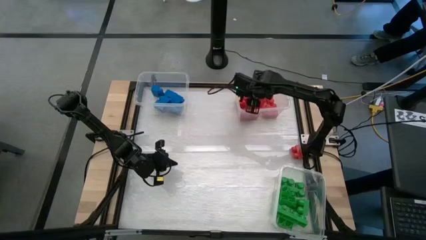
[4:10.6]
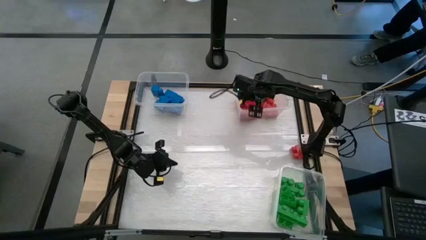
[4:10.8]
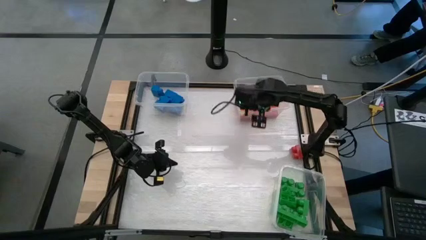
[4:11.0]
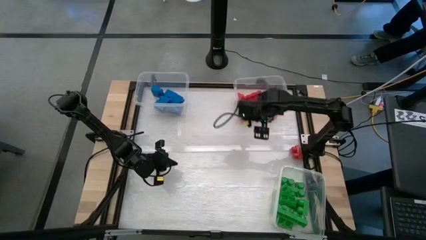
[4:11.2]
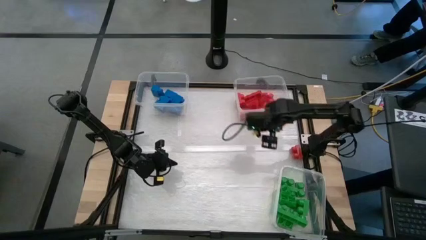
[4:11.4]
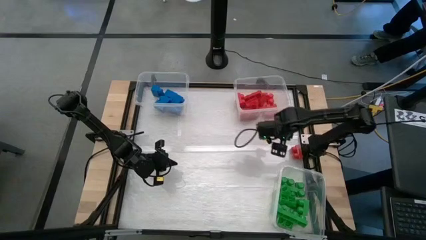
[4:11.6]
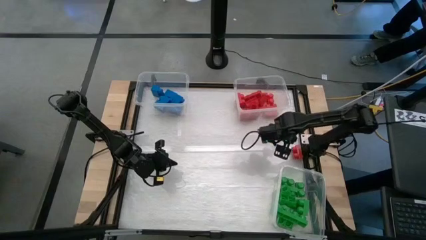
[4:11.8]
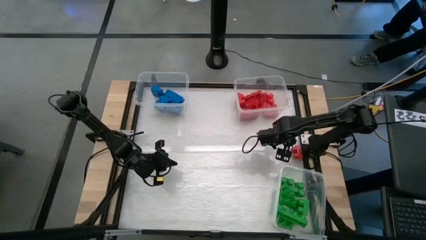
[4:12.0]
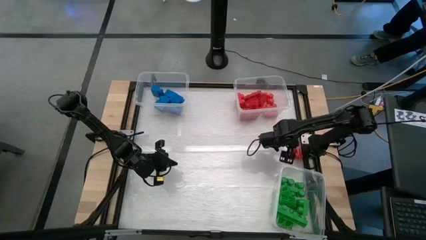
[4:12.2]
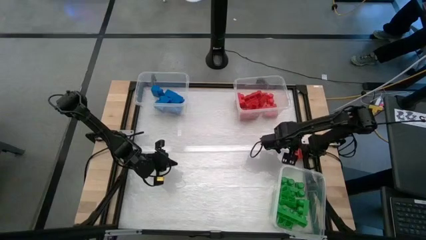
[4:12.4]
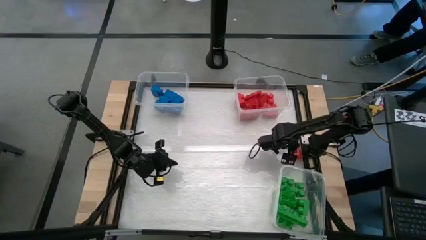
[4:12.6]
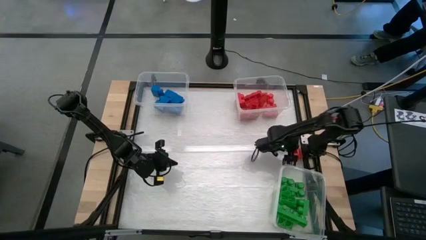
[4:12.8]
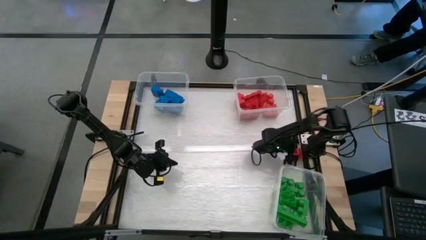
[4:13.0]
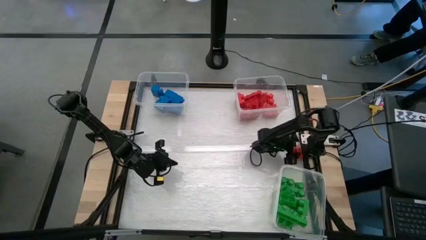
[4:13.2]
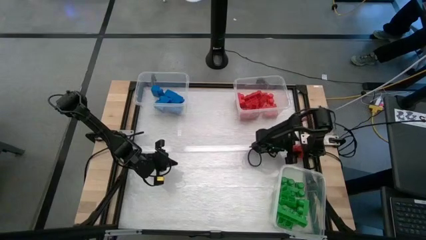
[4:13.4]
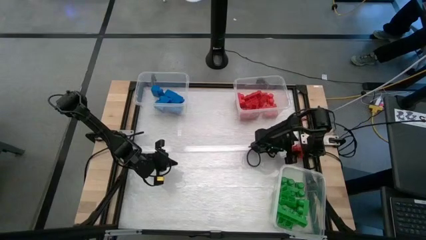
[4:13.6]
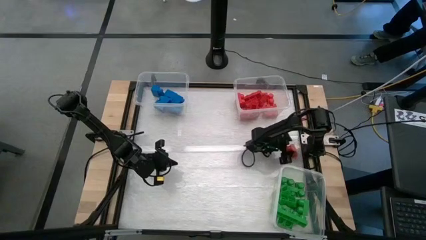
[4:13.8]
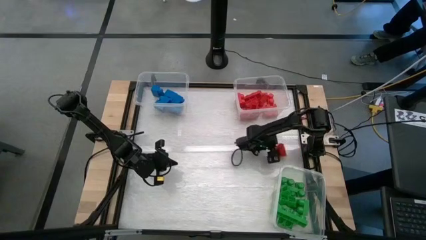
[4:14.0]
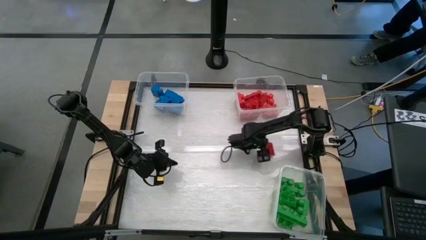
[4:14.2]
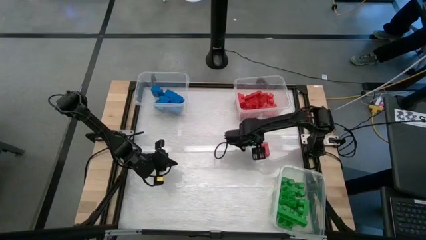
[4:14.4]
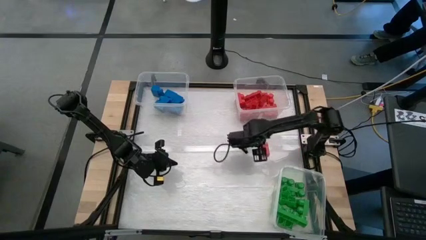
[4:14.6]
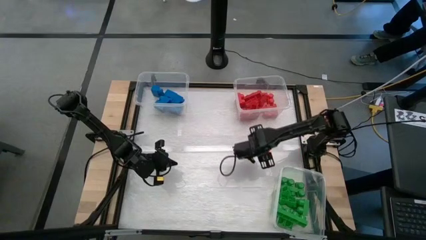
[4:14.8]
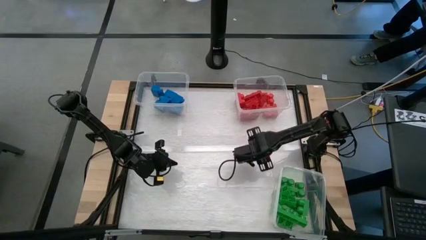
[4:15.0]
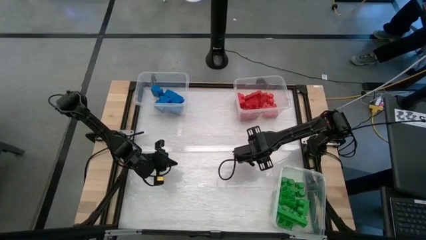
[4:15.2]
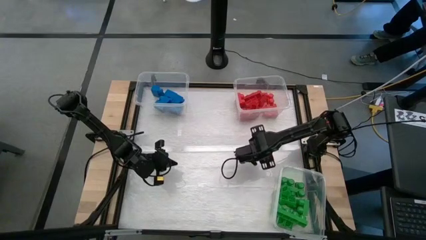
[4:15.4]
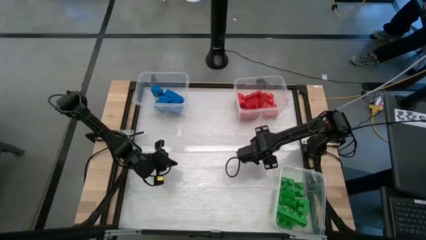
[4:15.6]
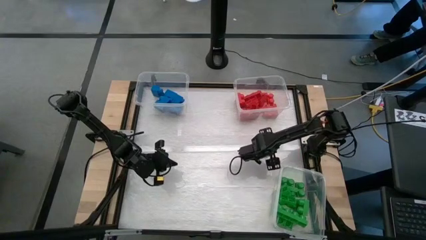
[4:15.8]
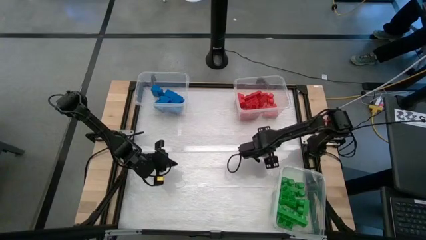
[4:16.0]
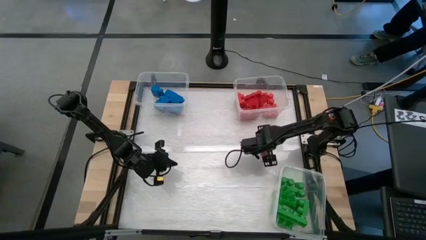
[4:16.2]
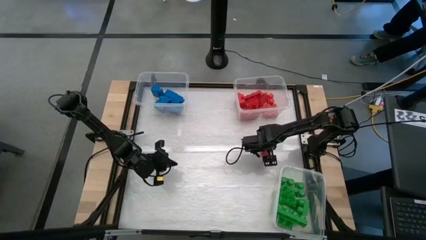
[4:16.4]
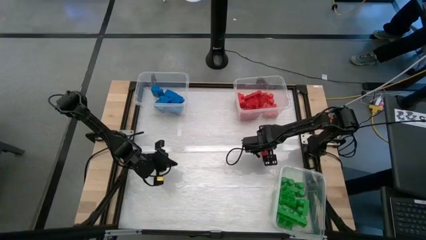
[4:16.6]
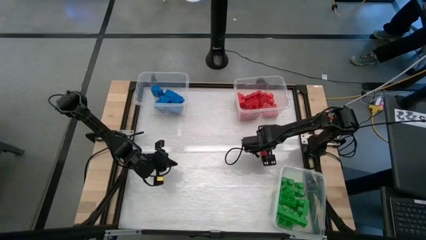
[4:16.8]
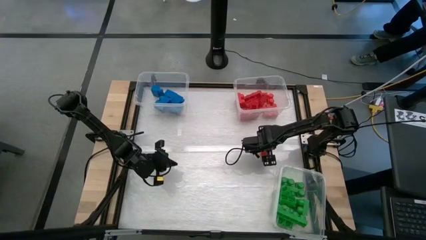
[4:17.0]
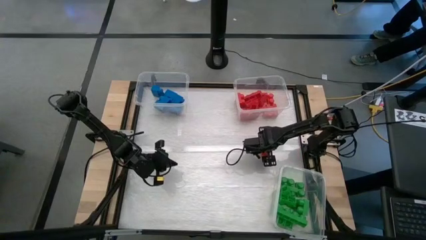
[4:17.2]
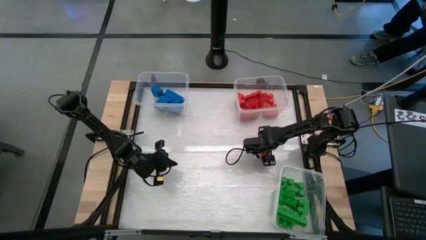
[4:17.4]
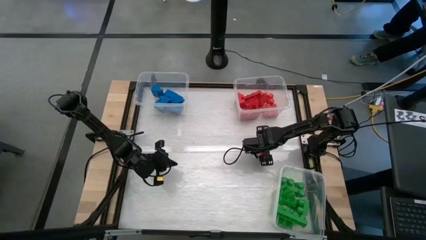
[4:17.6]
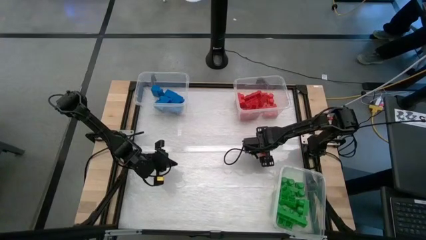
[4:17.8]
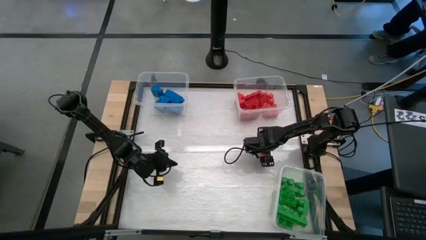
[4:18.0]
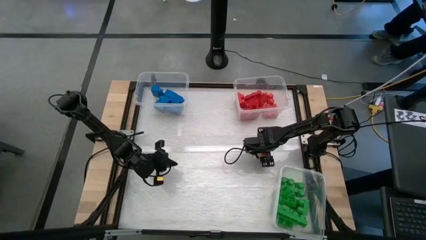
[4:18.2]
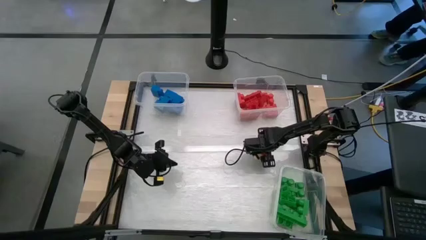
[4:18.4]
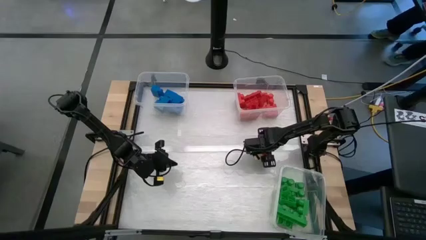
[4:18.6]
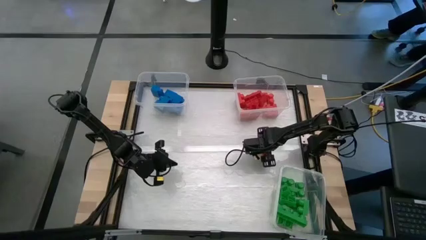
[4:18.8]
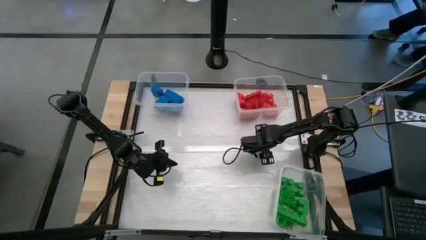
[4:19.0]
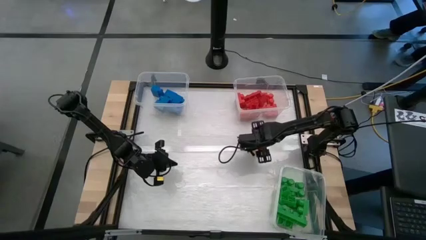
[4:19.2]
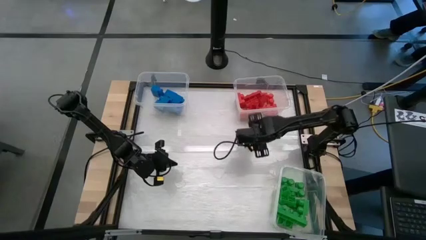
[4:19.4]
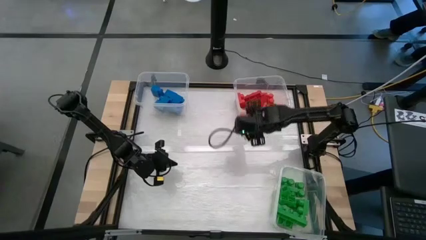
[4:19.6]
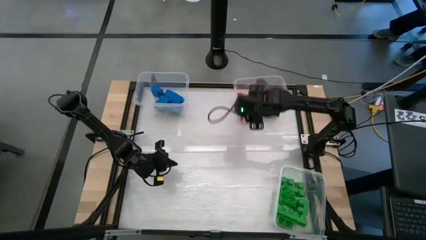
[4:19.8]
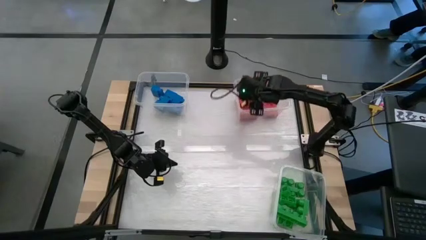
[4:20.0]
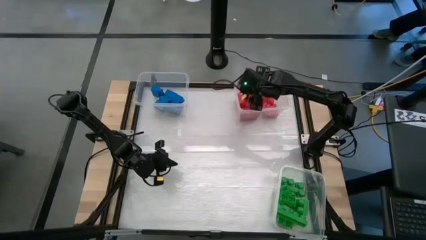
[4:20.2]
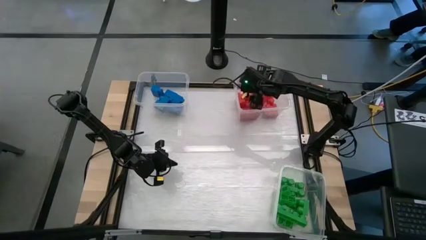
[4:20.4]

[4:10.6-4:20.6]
Task: Sort blocks
Put the red game piece into the top right transparent bin

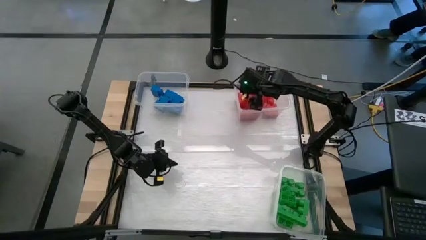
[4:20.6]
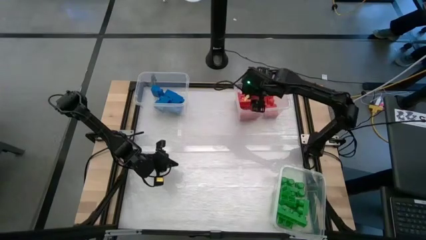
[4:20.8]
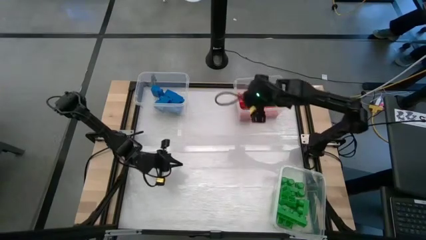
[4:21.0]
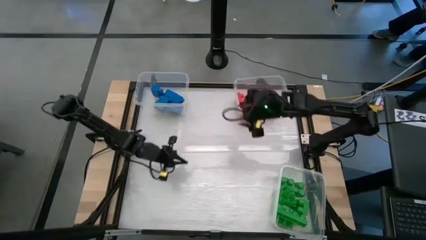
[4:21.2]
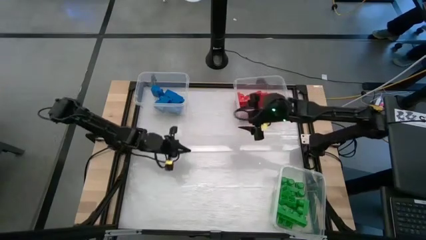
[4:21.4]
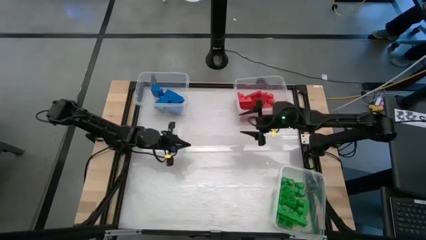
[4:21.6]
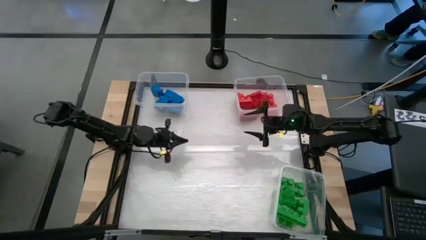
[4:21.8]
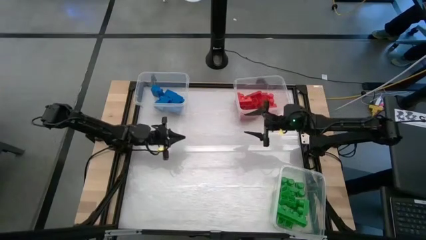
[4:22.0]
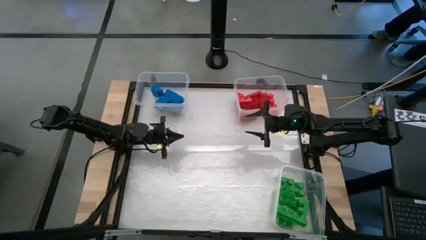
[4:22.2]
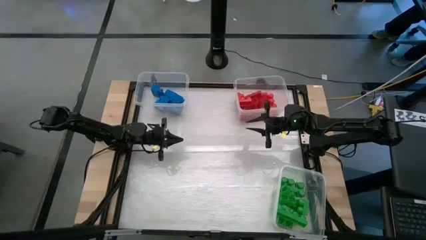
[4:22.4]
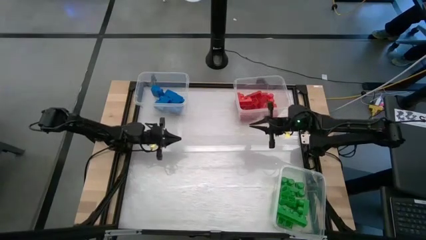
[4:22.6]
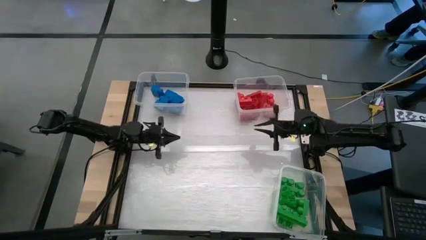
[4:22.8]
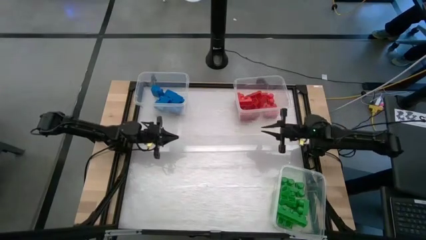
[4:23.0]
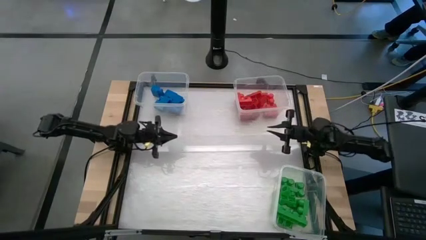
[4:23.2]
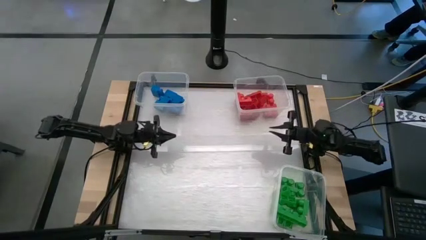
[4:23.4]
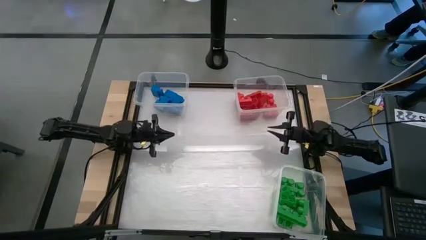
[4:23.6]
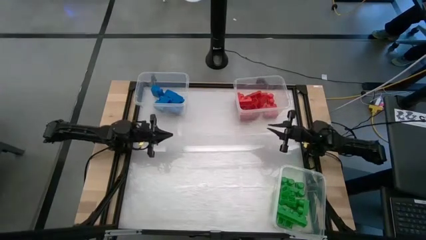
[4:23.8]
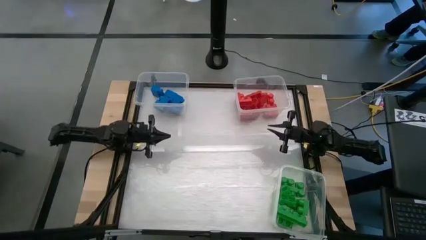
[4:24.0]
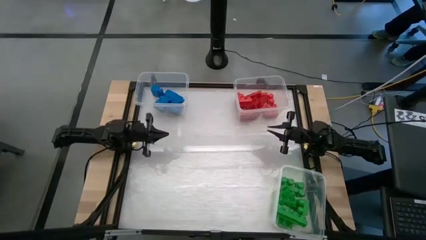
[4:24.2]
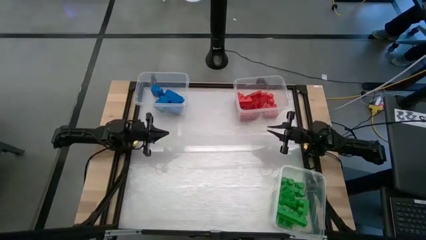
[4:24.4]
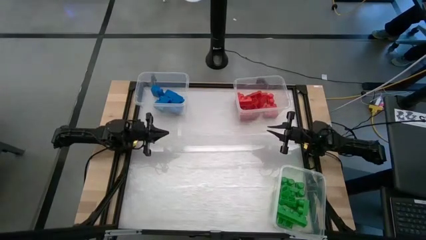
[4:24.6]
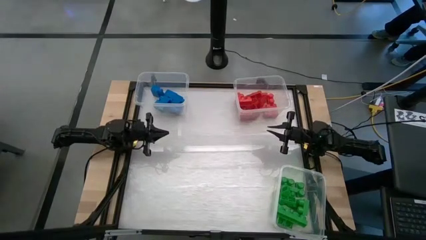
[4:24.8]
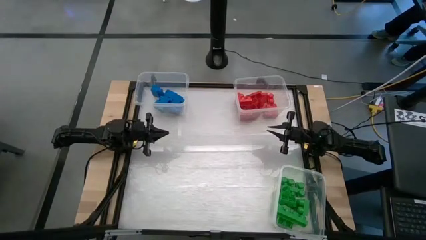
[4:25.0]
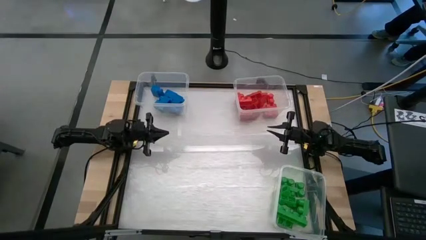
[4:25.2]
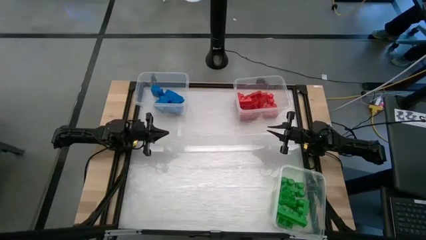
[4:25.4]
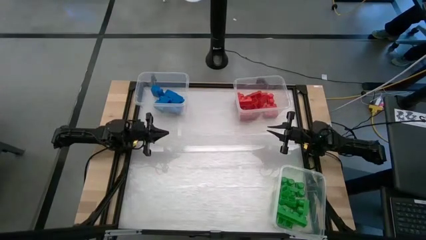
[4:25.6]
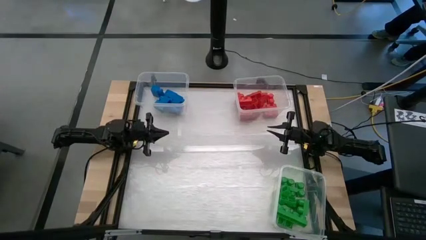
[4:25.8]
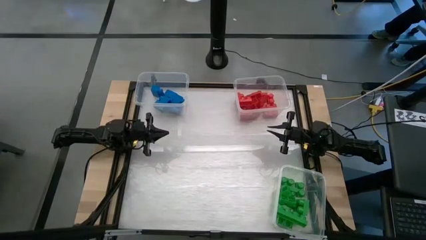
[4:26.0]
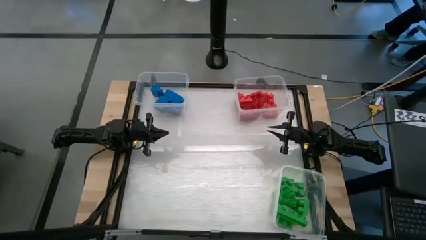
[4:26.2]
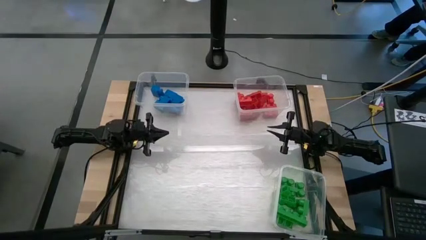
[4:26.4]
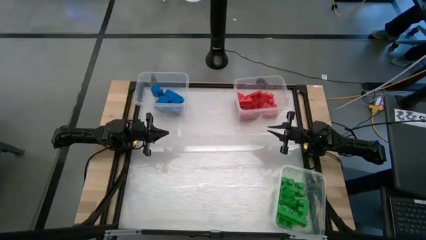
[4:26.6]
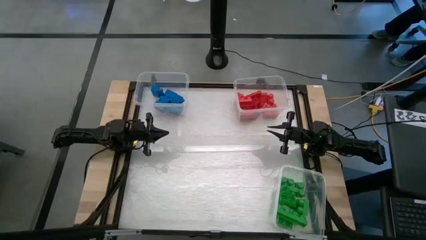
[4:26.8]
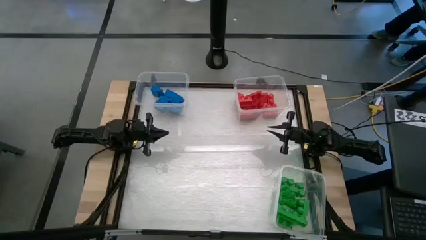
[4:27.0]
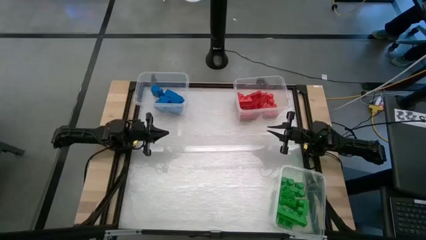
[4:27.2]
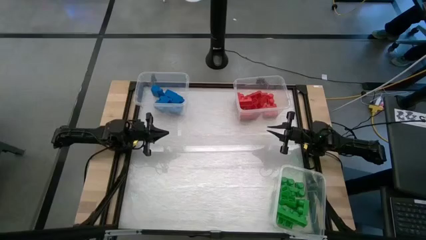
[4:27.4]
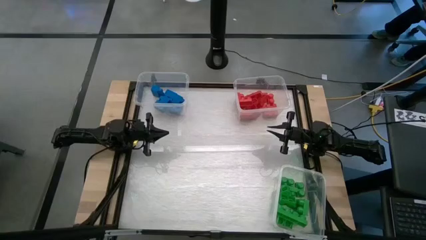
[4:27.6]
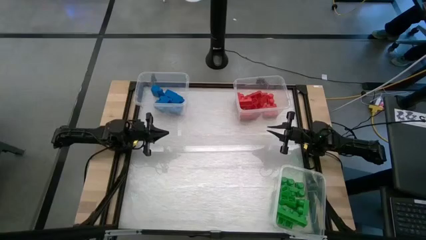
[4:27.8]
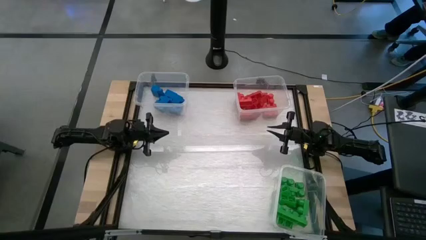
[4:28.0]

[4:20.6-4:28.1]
Return to Home position
